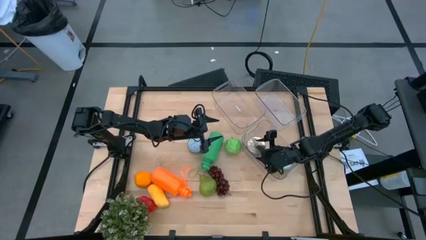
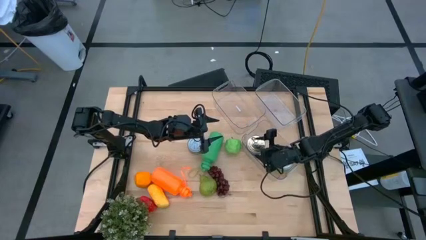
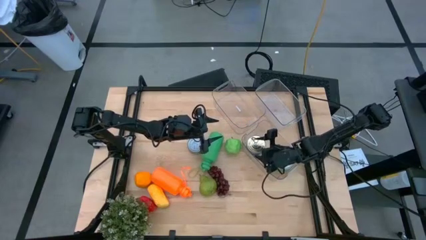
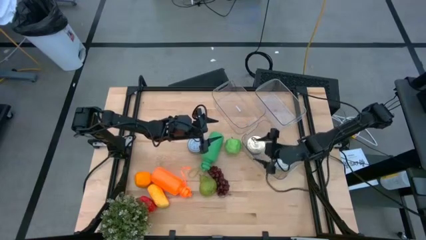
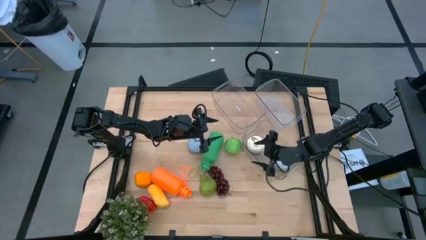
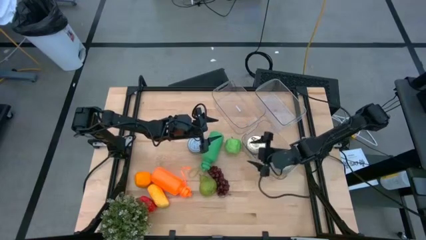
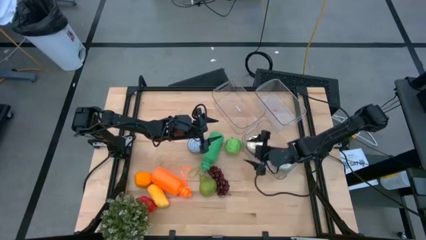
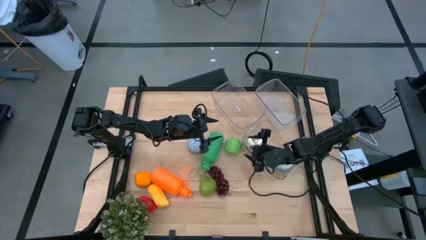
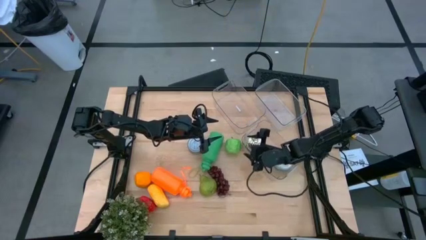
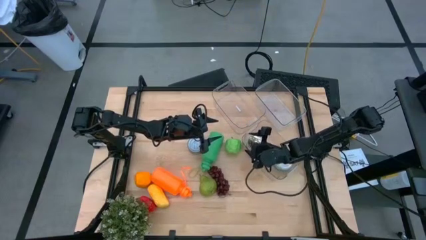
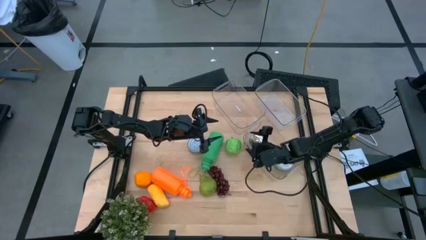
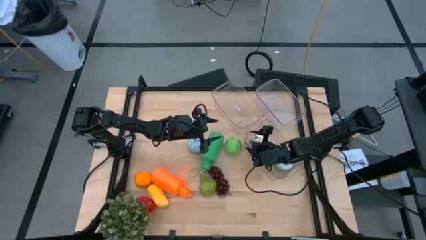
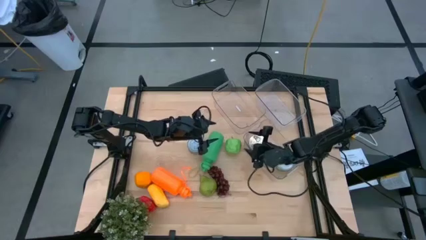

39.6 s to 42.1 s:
Task: Pick & Place Food Item
Adjust the bottom transparent bin on the table

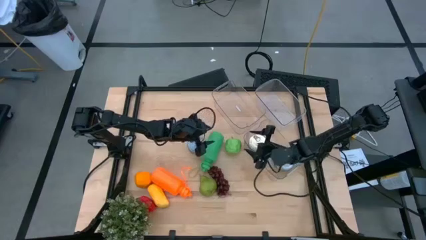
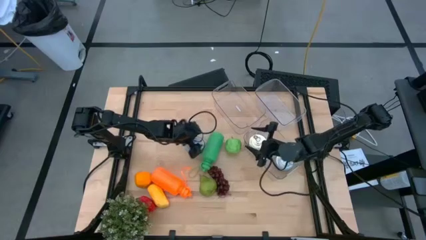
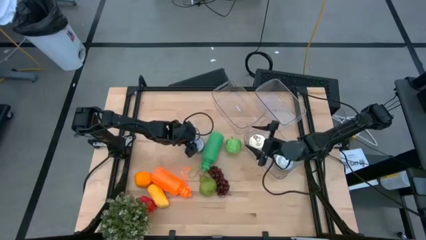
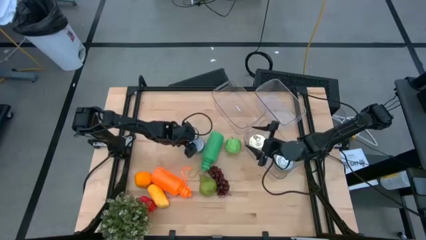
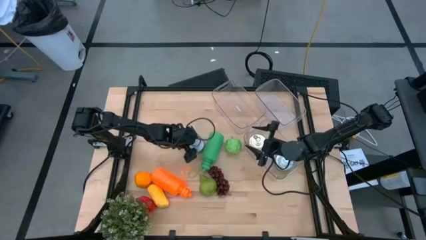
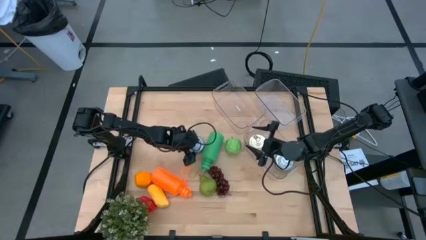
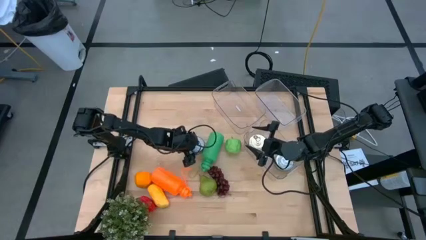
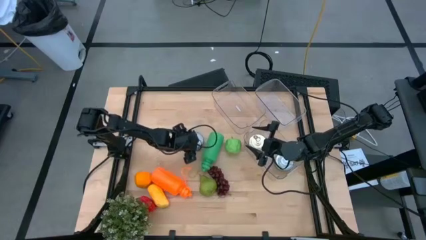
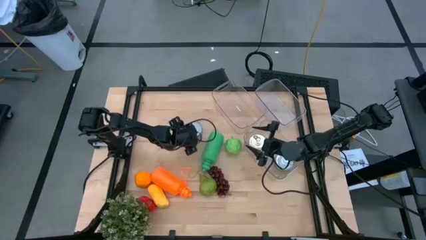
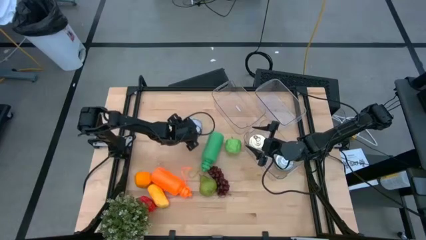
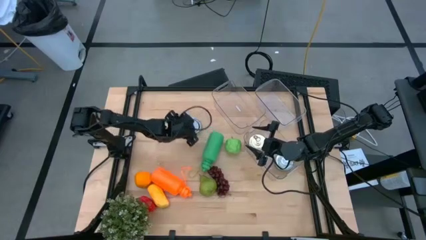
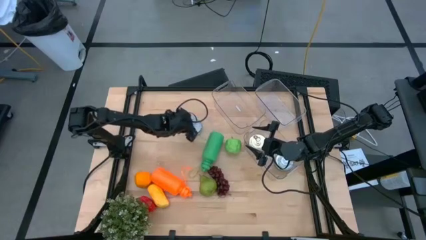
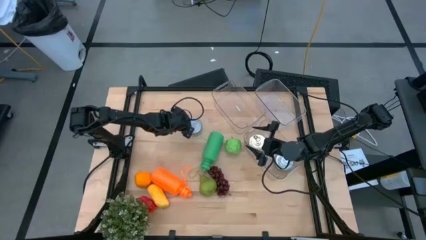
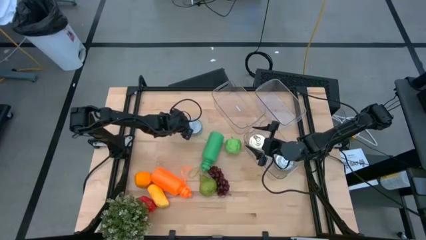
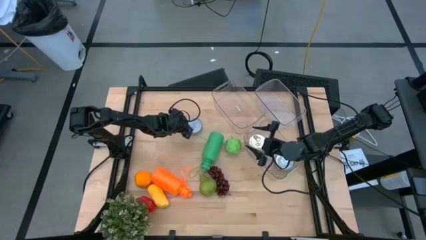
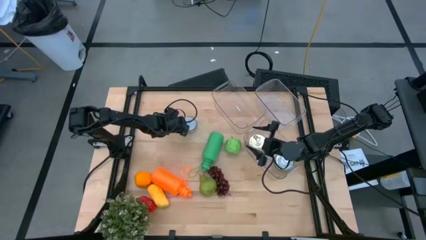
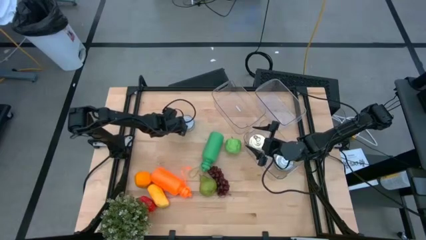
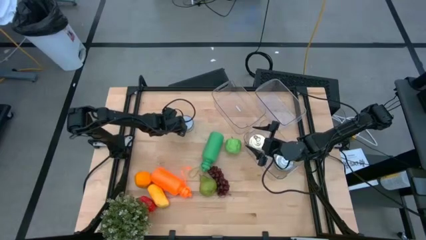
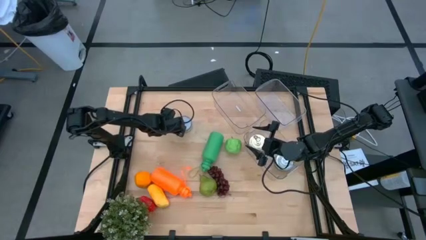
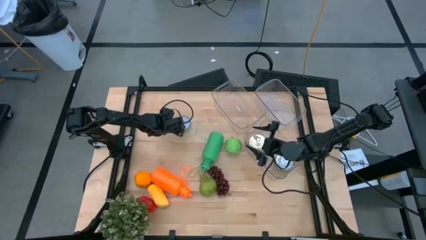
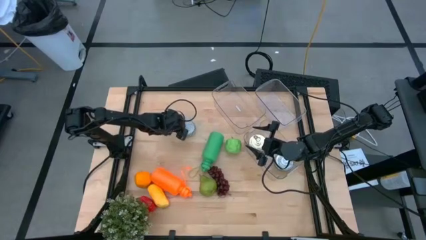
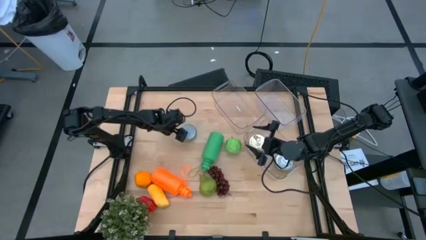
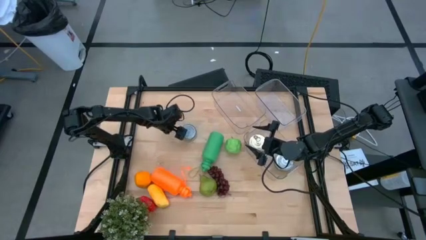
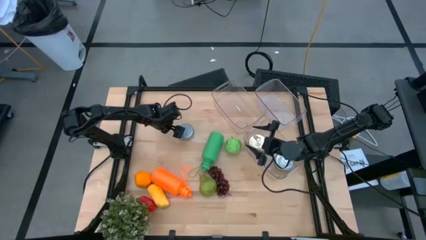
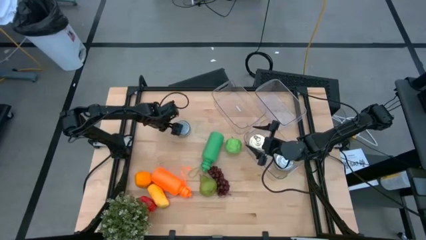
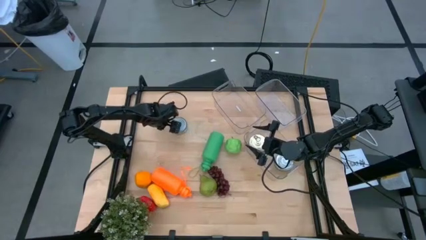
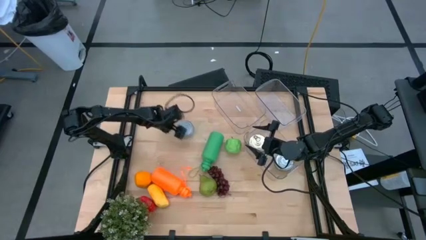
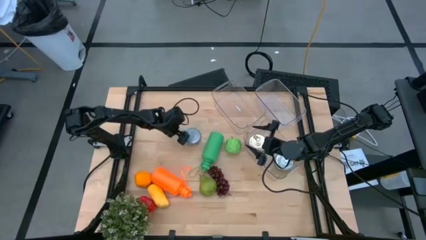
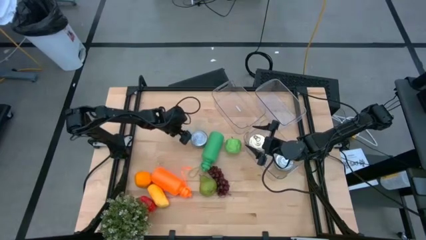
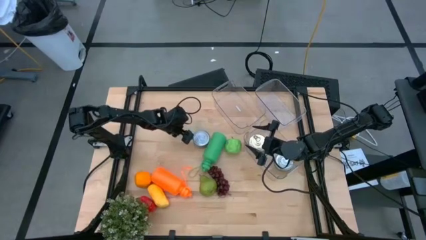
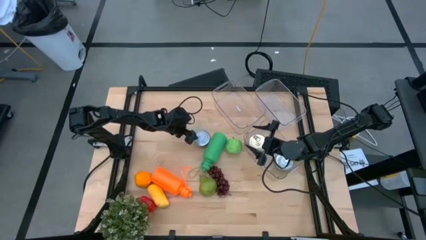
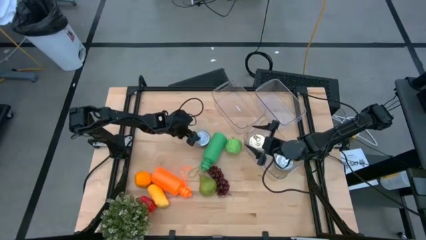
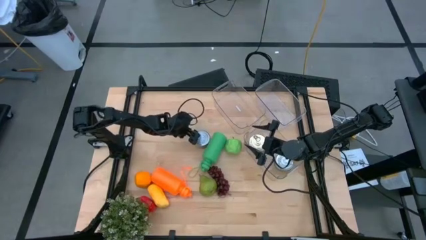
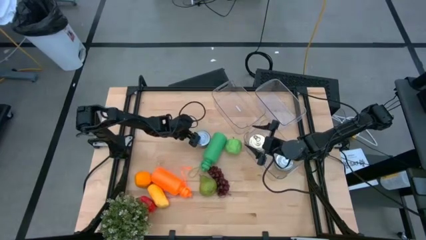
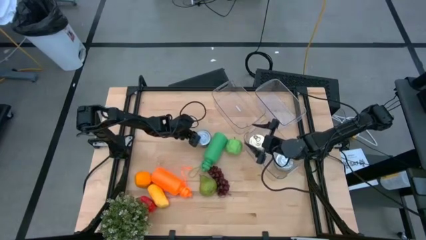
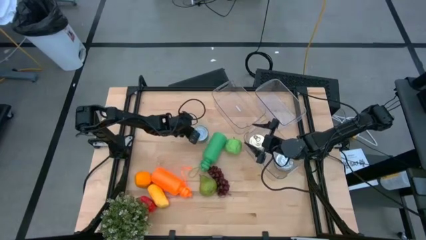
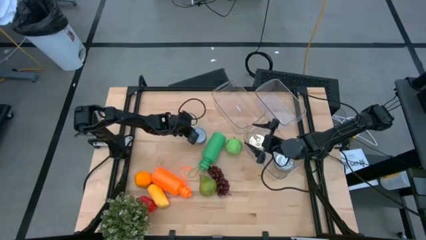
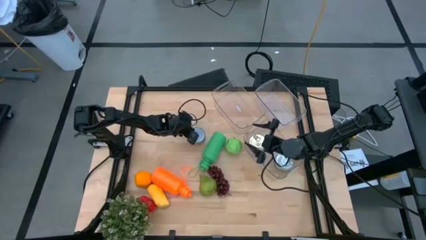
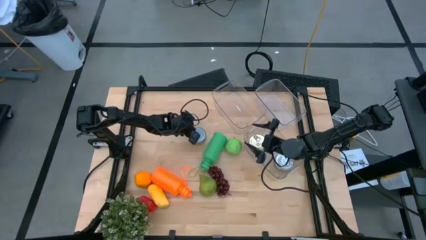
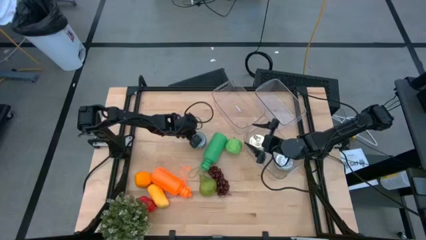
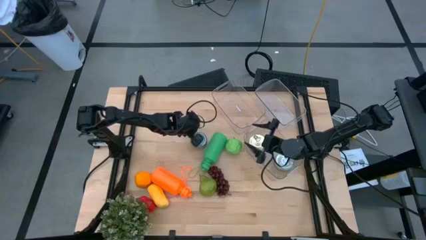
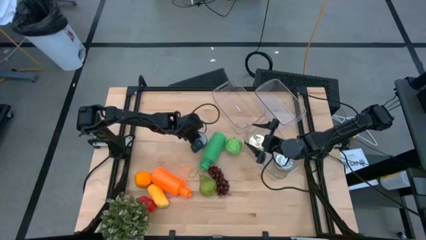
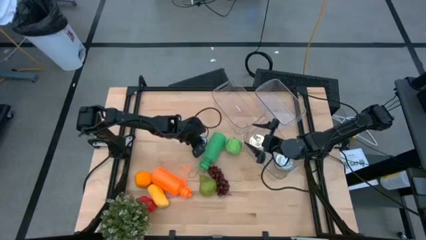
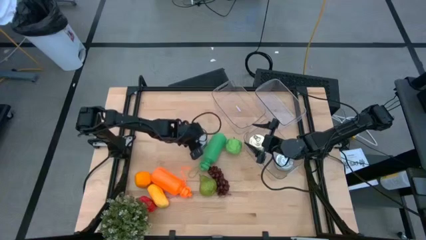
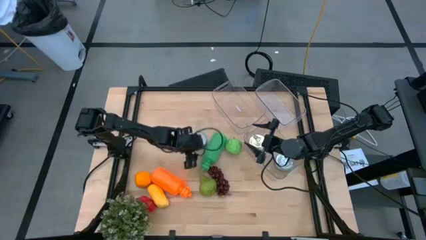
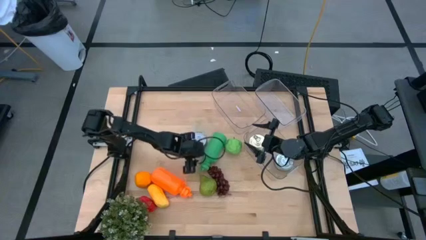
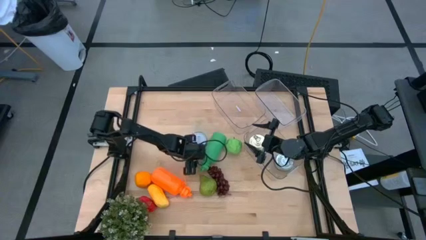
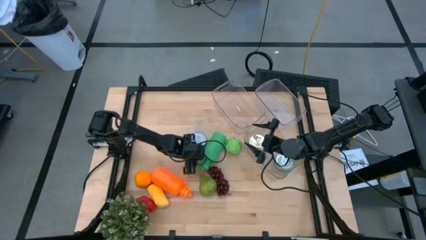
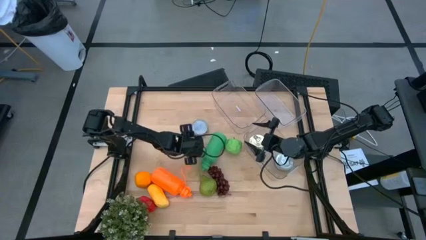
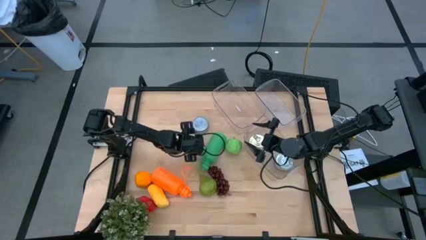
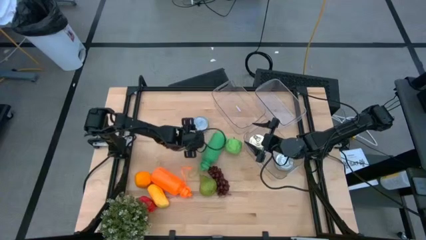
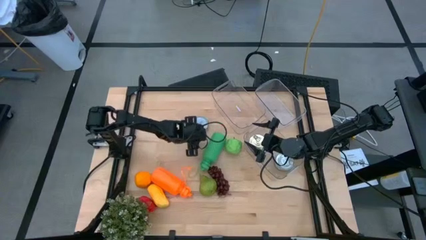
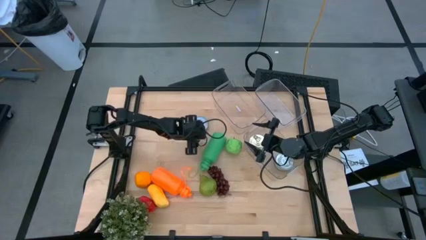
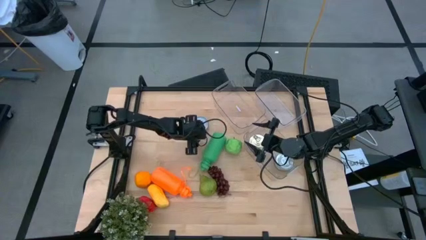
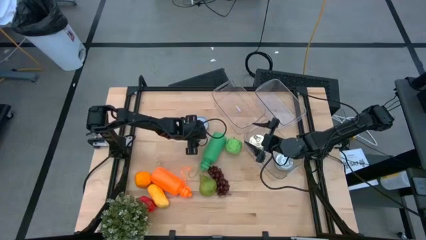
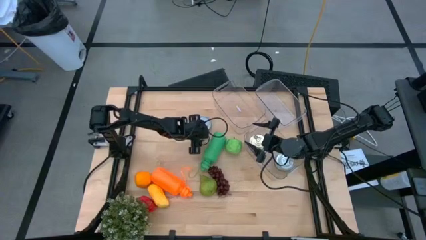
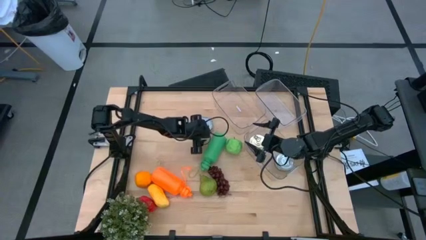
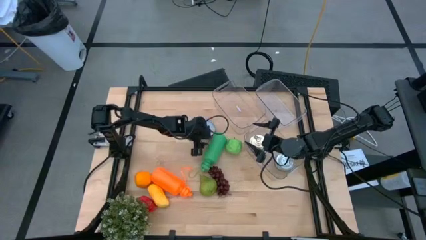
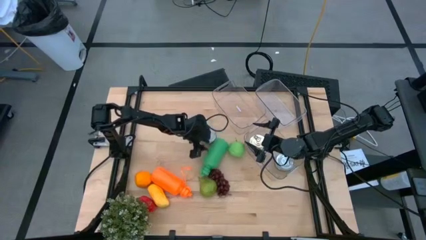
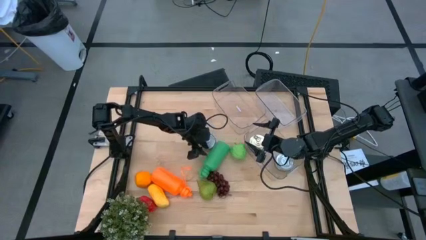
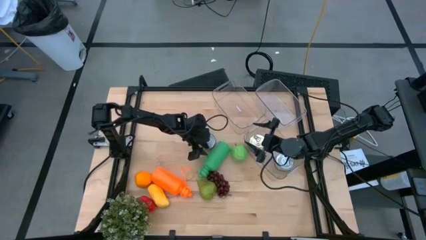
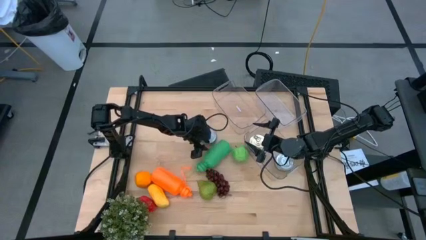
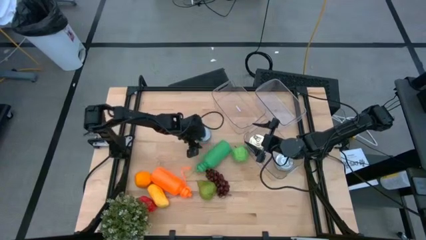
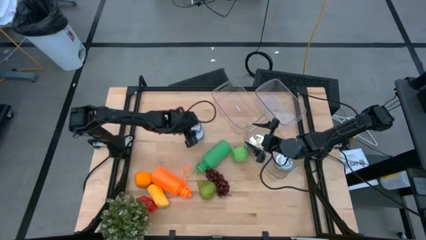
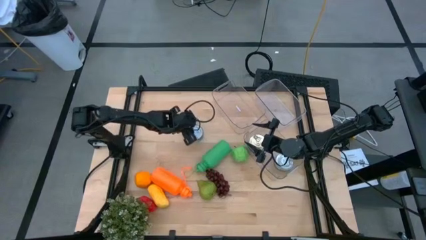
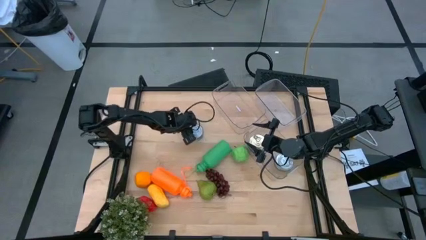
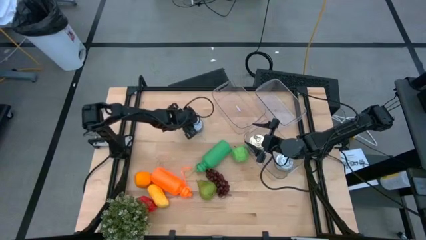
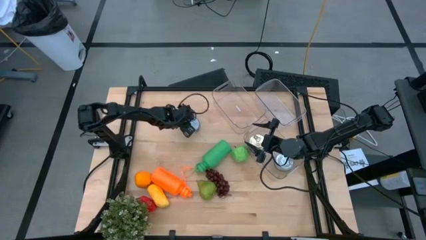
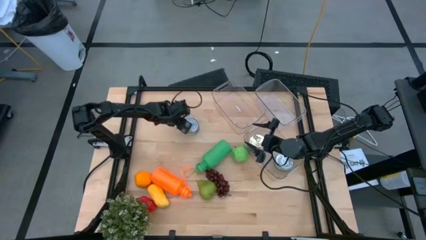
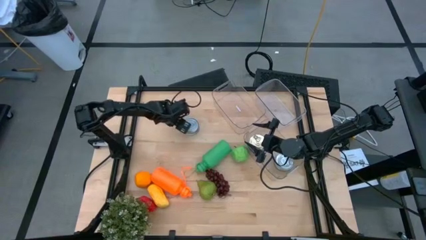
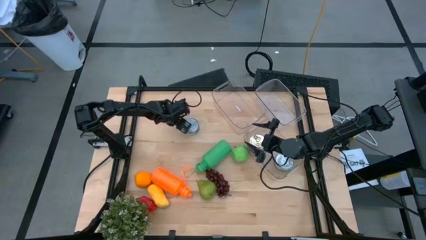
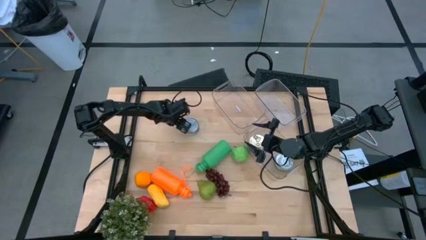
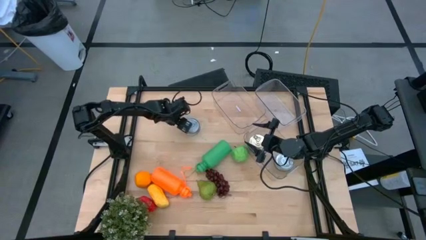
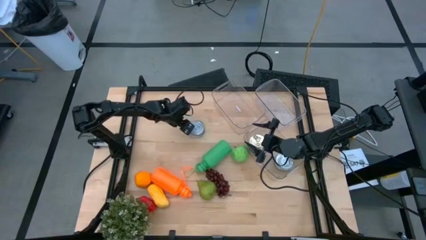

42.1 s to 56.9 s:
Put the green tuna can into the bottom transparent bin
